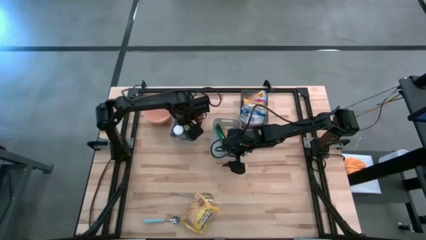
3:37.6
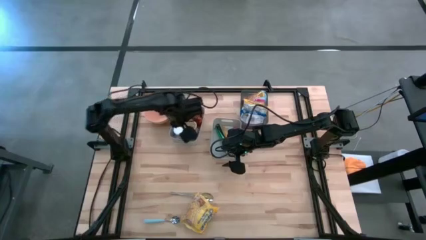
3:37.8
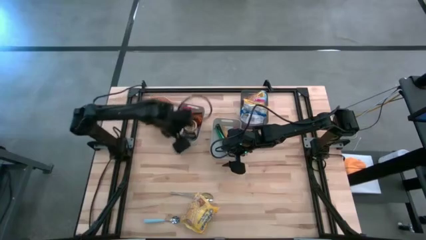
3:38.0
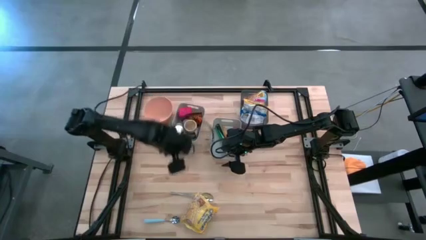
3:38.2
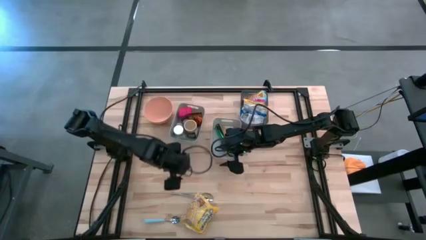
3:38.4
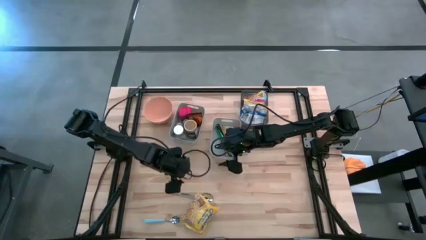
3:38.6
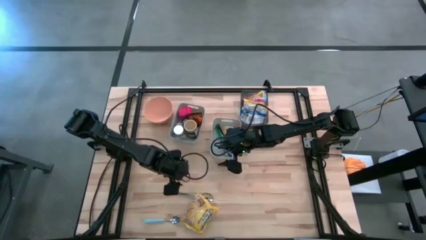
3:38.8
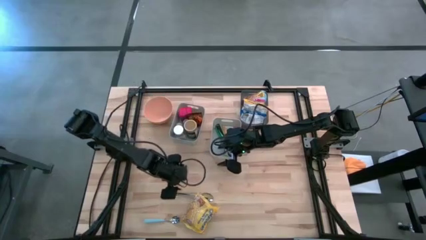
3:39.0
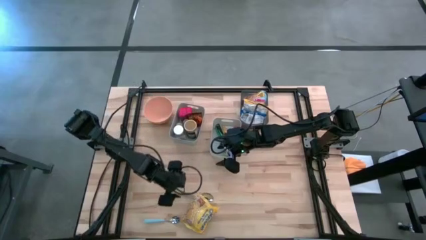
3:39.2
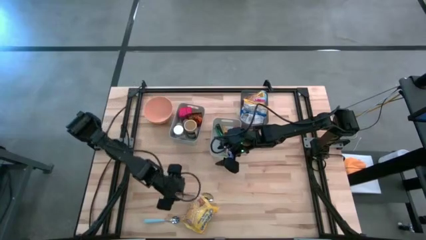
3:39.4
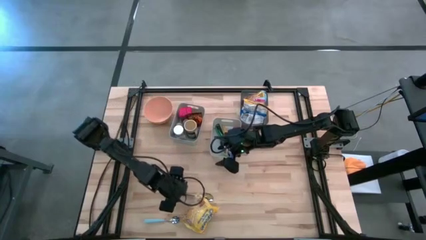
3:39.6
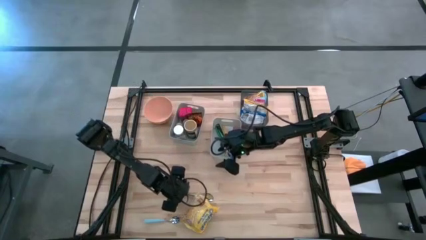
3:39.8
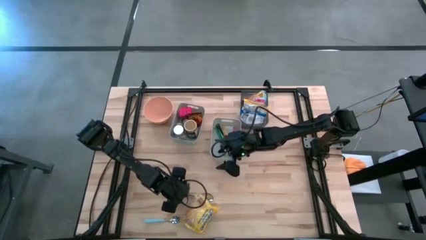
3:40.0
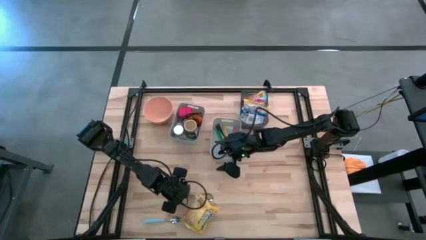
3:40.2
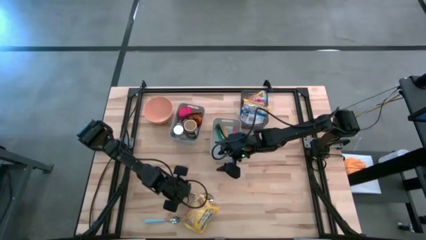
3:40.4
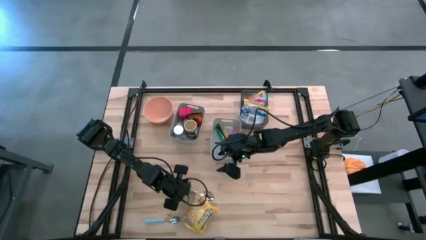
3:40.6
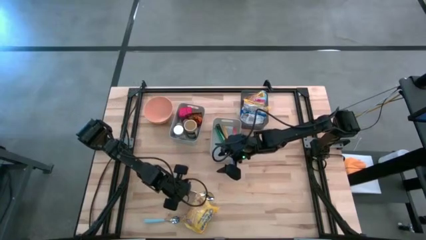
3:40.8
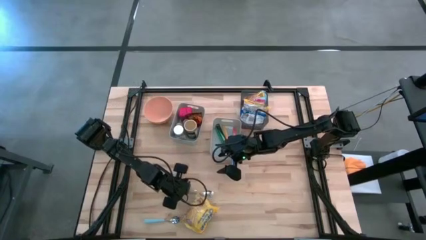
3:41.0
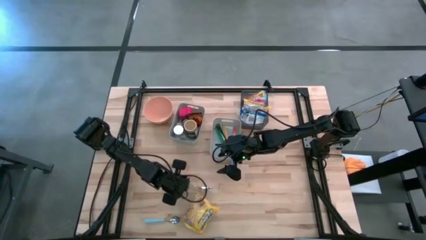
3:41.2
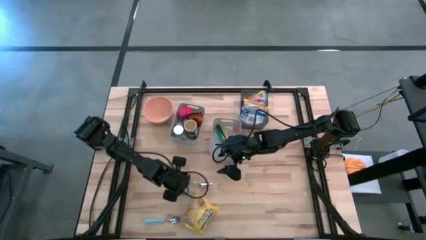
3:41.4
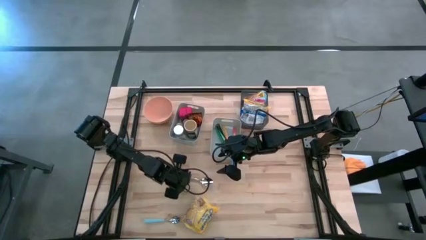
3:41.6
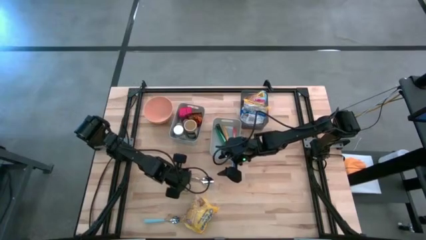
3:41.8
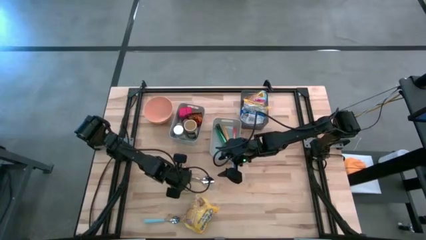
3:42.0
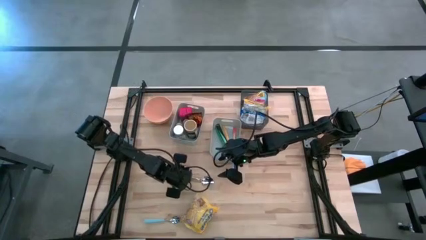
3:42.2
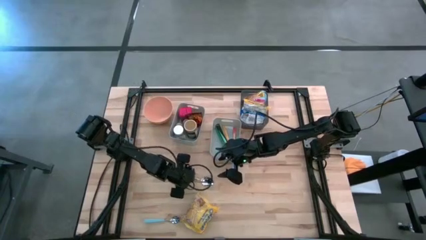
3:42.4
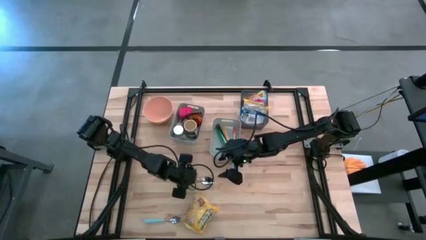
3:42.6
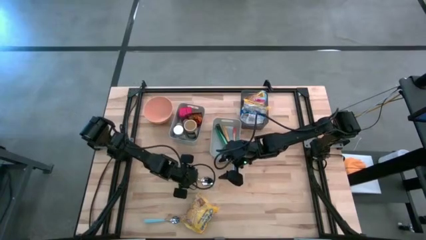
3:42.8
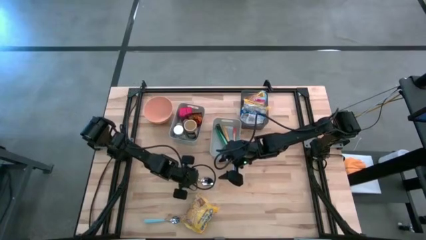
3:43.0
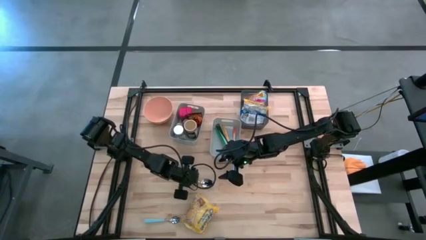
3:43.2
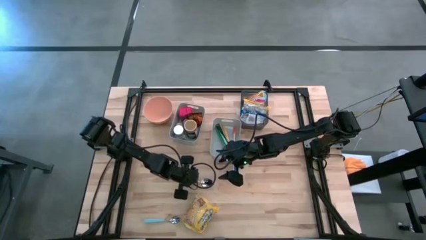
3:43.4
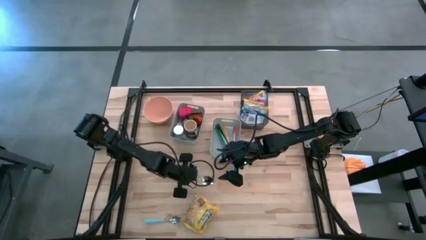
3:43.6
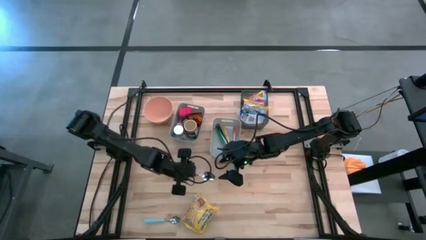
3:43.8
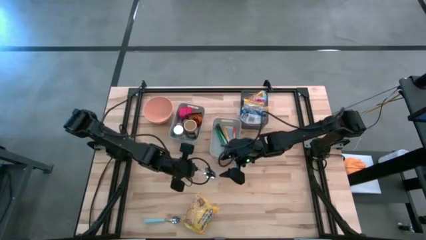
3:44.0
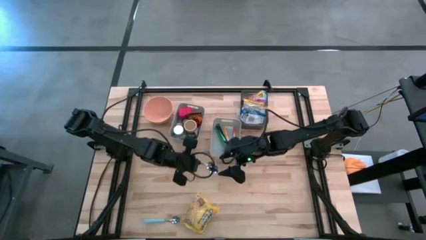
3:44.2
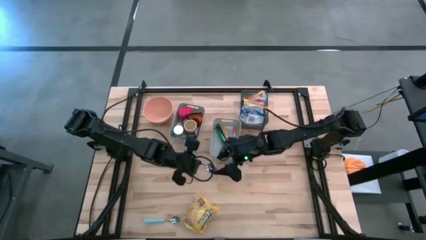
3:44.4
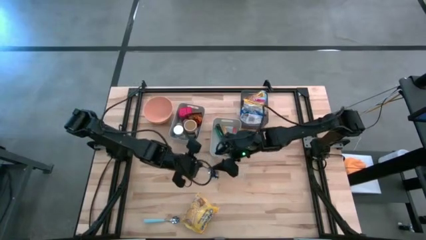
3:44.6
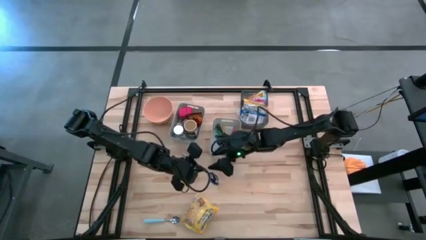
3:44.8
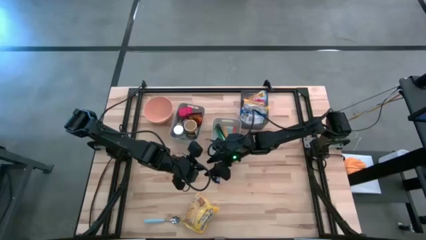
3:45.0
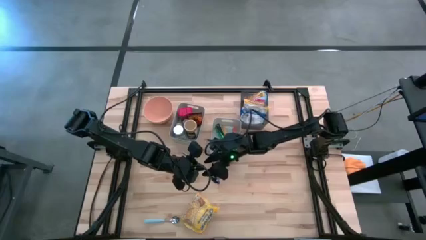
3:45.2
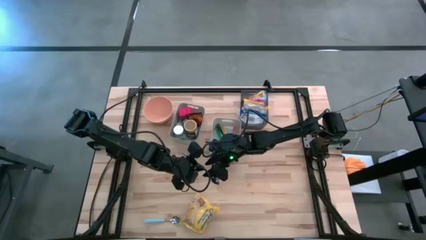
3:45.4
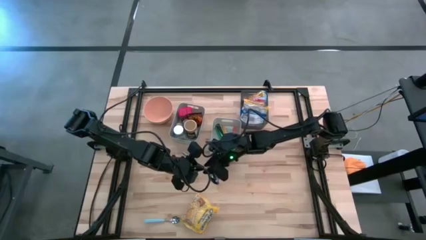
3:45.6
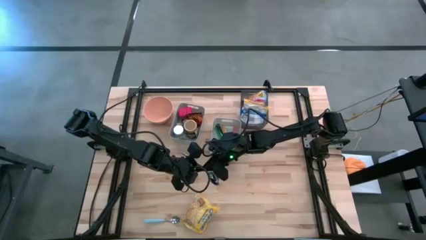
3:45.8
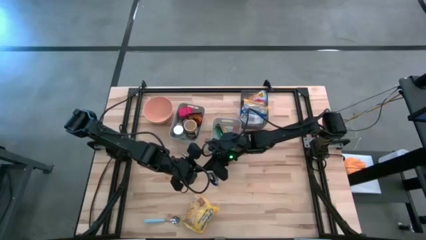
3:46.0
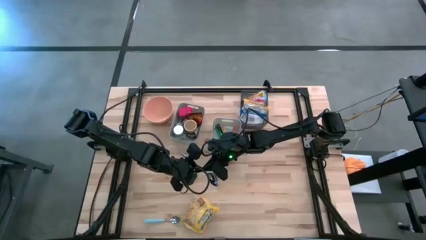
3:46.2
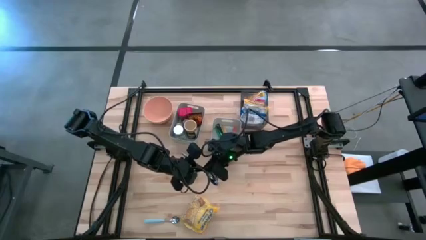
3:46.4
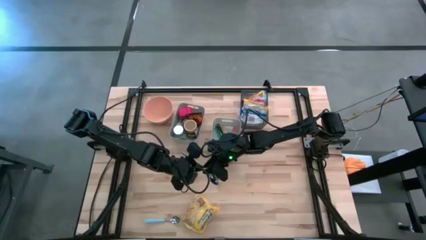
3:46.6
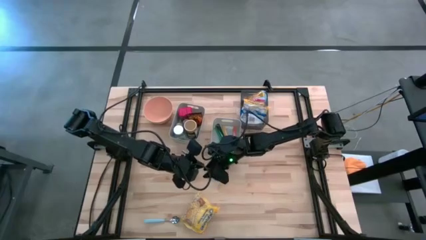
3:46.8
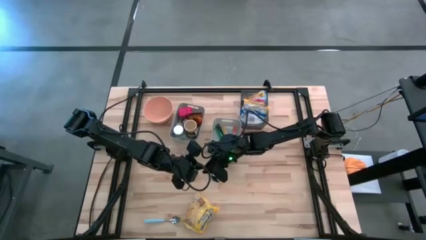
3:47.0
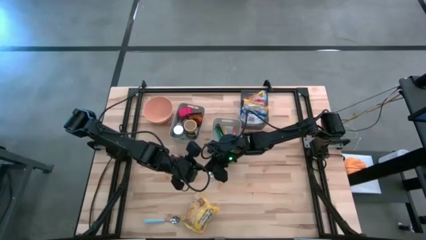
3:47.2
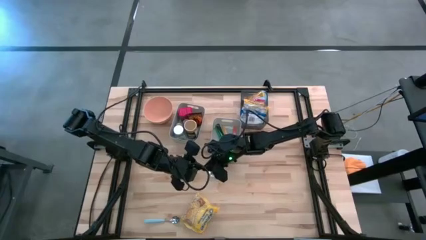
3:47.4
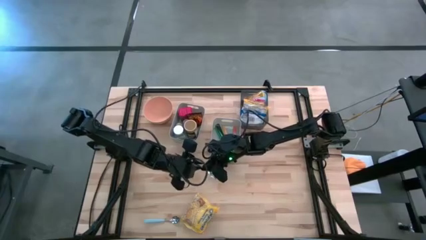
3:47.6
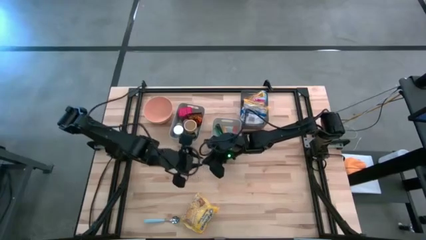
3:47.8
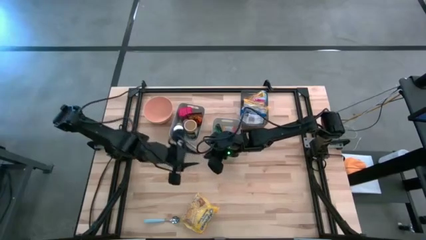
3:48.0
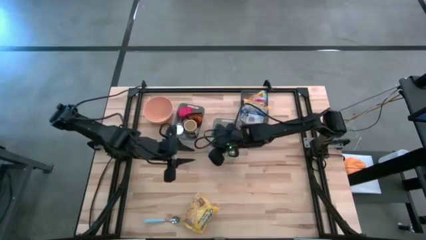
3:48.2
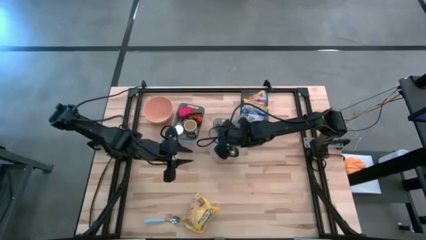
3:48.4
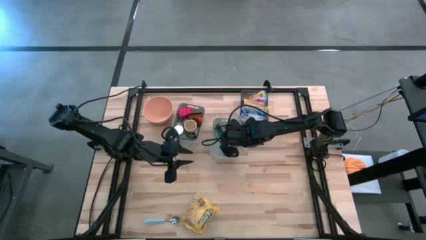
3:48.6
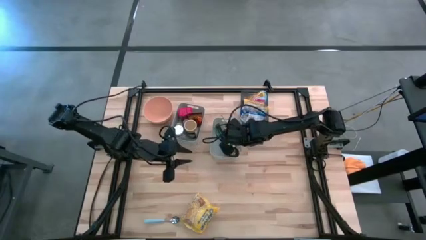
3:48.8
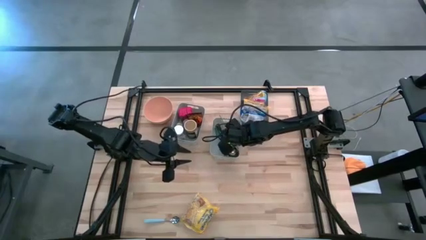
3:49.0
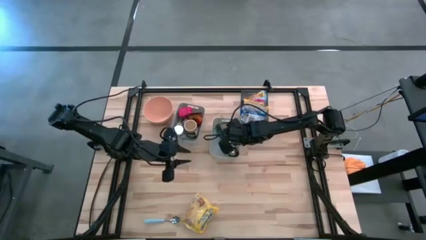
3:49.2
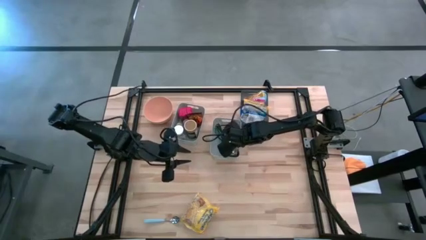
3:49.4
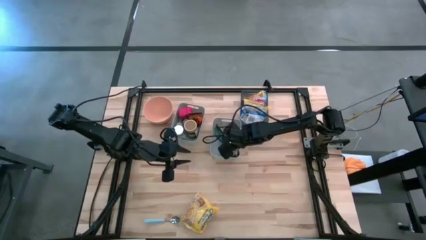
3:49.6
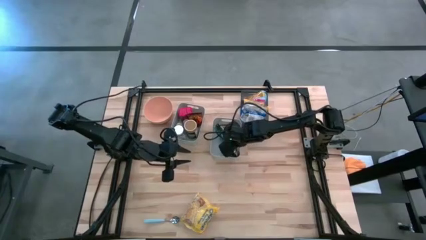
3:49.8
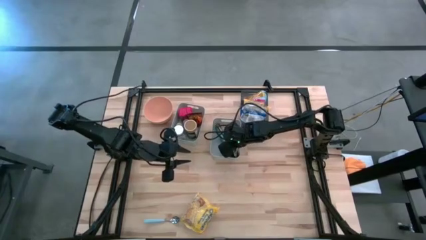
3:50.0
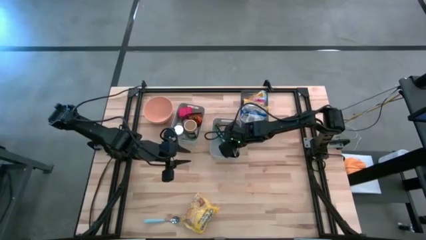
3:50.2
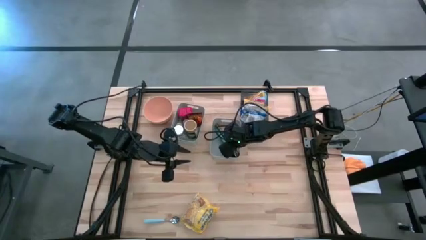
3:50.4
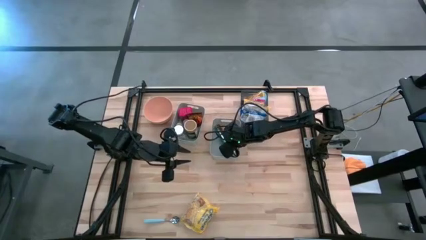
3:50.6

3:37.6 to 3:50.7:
Put the silver spoon into the right gray bin
